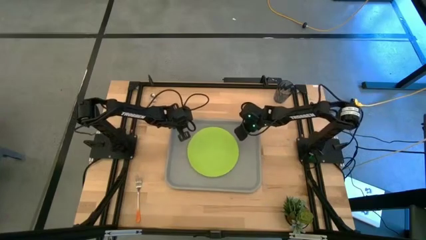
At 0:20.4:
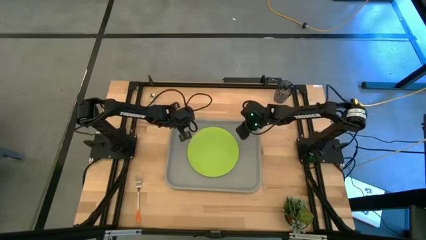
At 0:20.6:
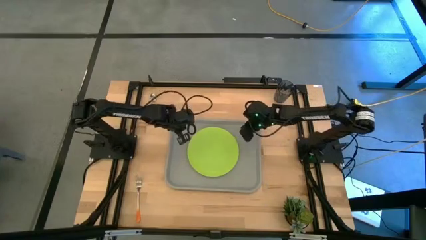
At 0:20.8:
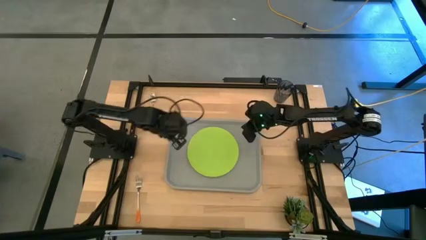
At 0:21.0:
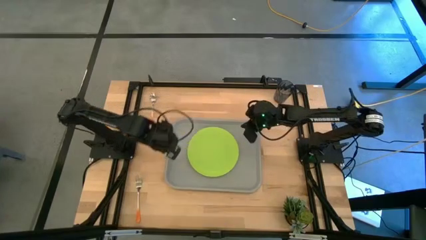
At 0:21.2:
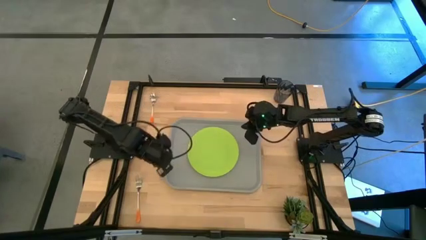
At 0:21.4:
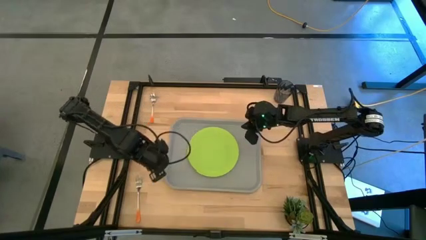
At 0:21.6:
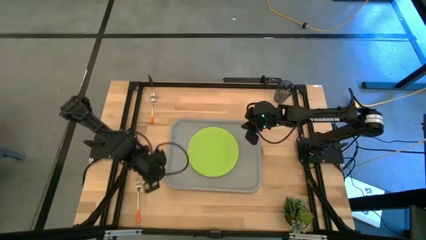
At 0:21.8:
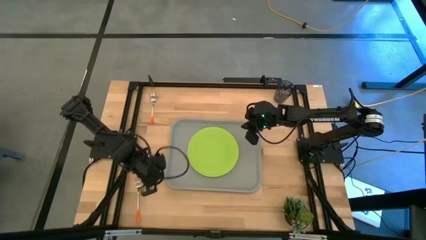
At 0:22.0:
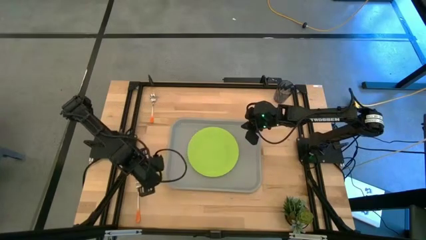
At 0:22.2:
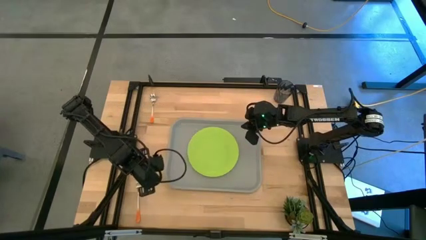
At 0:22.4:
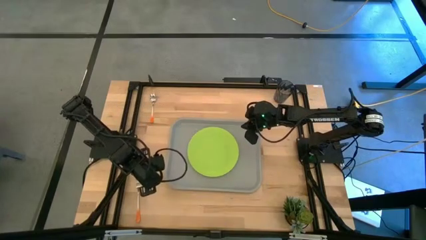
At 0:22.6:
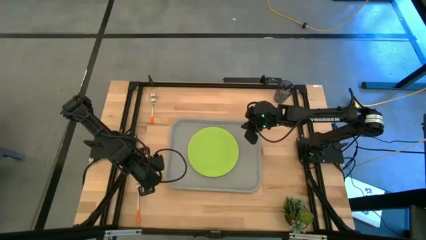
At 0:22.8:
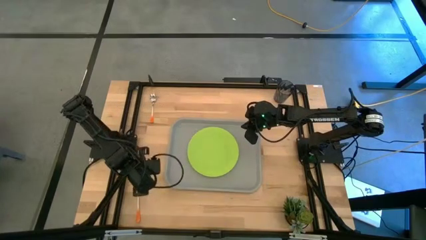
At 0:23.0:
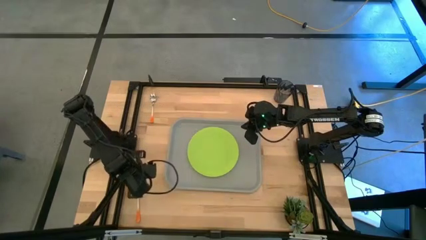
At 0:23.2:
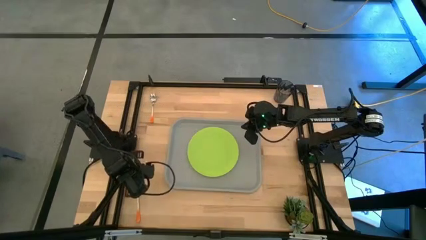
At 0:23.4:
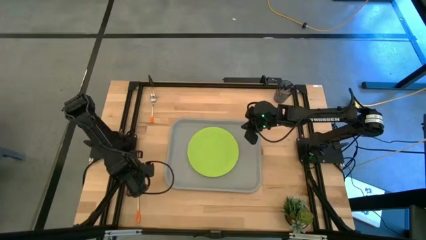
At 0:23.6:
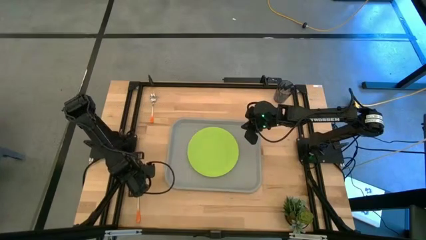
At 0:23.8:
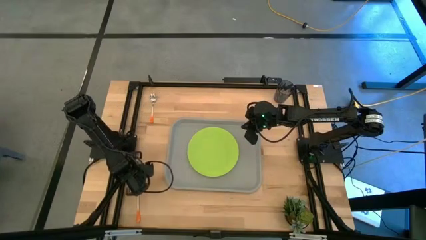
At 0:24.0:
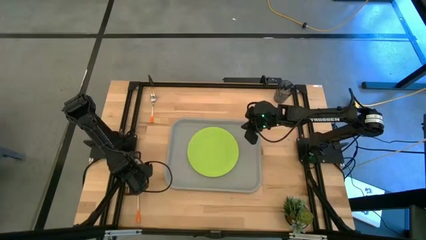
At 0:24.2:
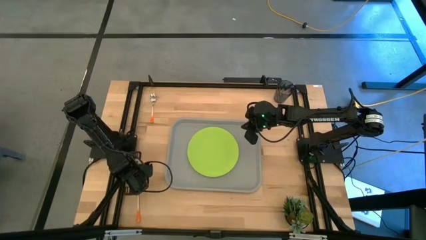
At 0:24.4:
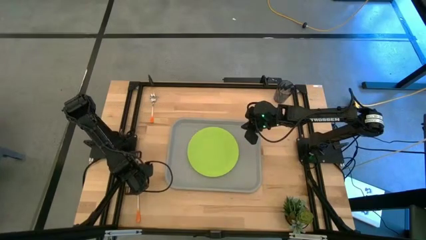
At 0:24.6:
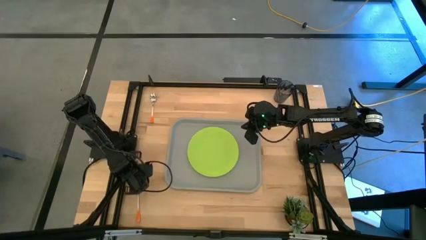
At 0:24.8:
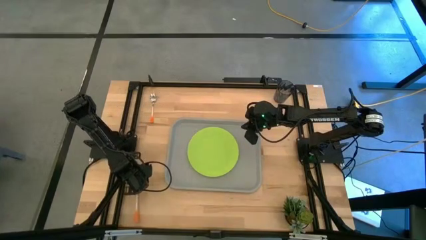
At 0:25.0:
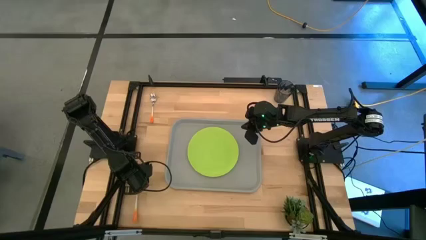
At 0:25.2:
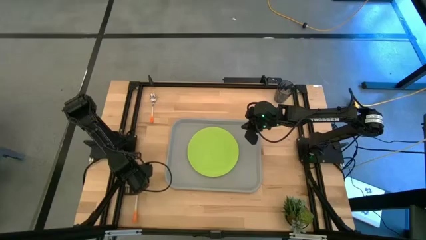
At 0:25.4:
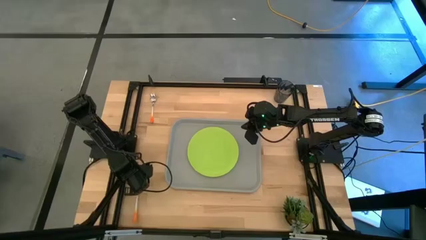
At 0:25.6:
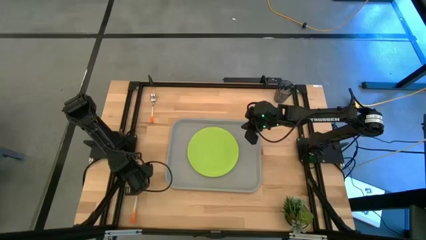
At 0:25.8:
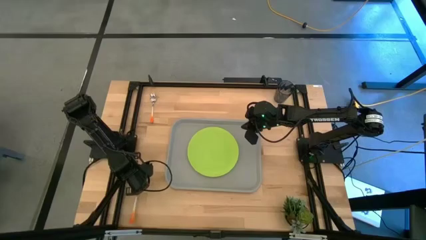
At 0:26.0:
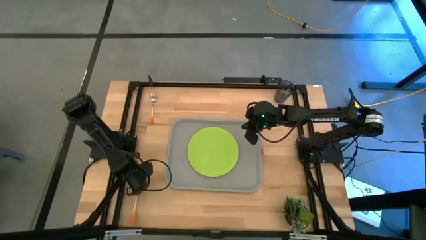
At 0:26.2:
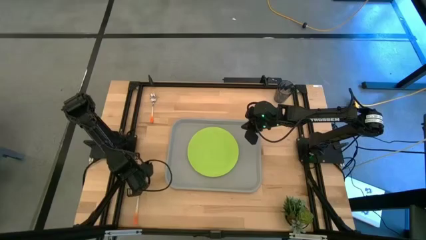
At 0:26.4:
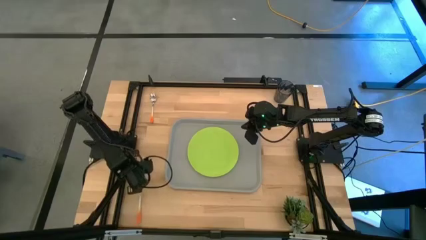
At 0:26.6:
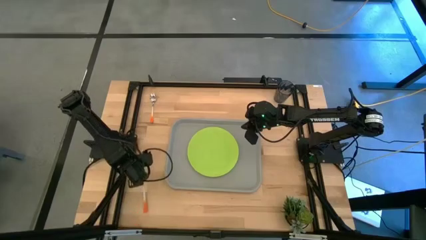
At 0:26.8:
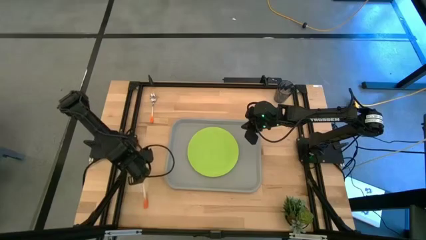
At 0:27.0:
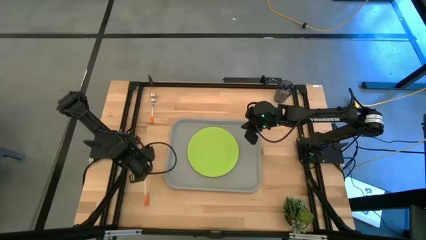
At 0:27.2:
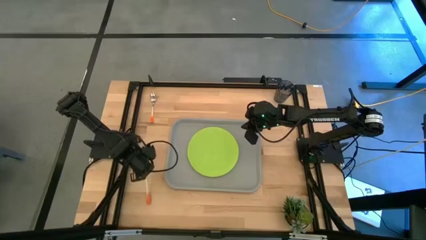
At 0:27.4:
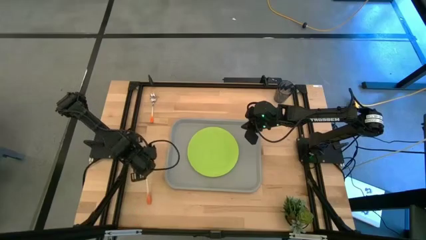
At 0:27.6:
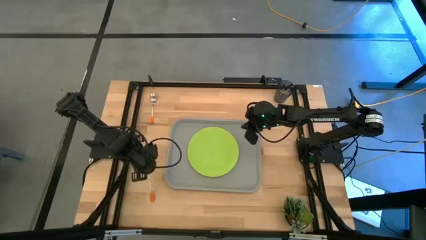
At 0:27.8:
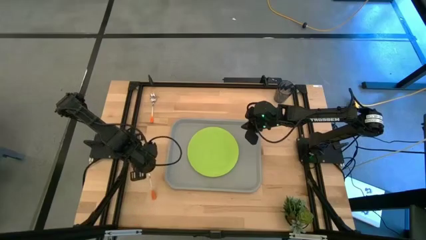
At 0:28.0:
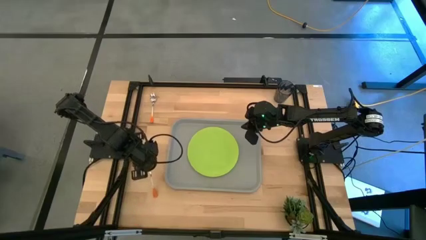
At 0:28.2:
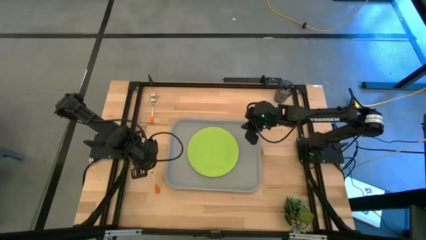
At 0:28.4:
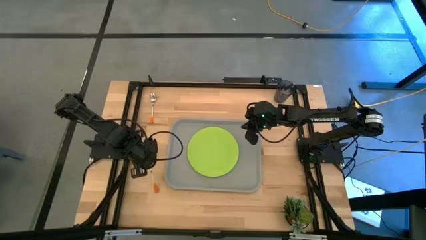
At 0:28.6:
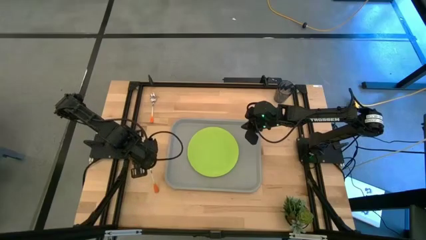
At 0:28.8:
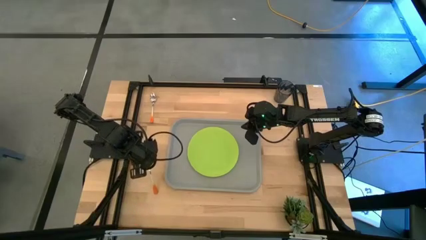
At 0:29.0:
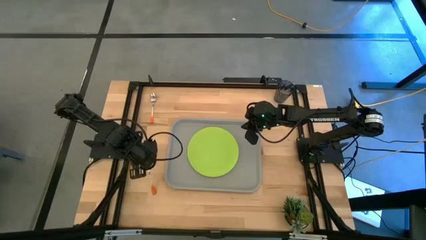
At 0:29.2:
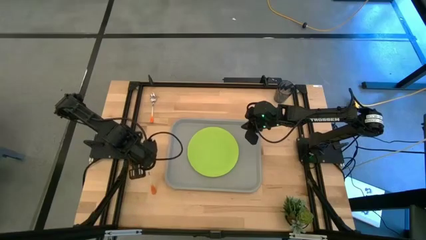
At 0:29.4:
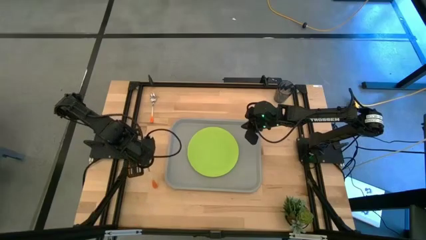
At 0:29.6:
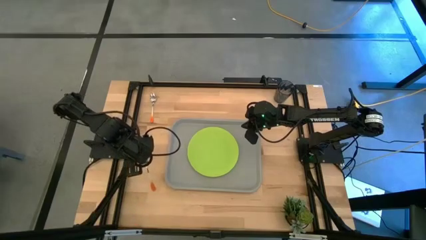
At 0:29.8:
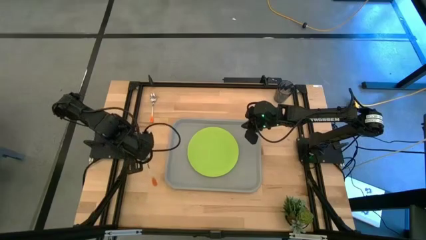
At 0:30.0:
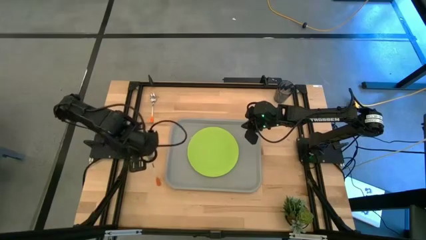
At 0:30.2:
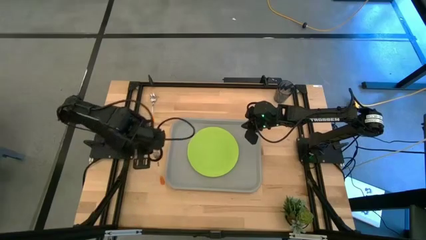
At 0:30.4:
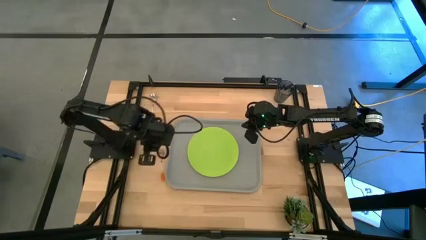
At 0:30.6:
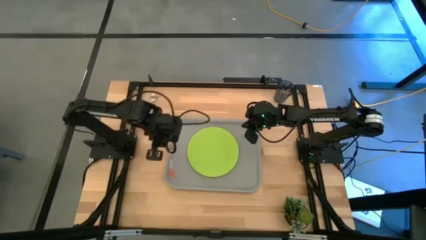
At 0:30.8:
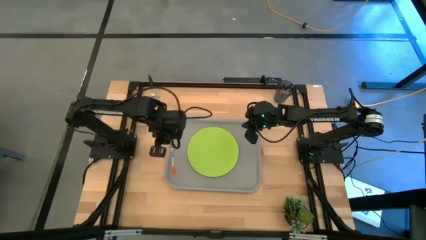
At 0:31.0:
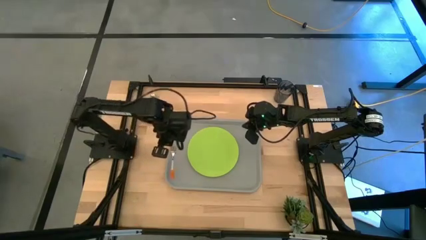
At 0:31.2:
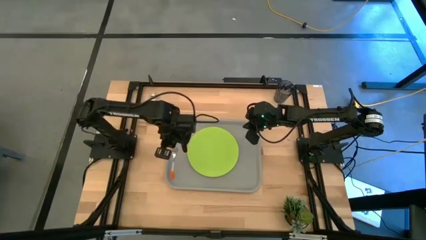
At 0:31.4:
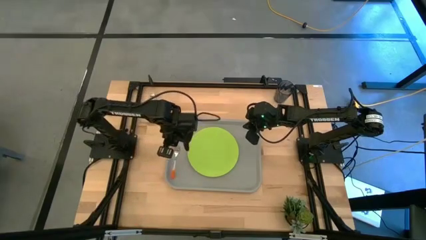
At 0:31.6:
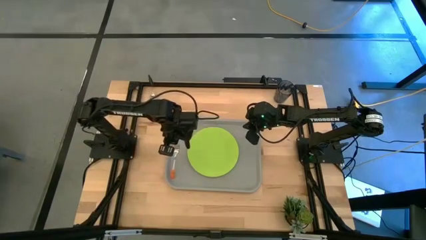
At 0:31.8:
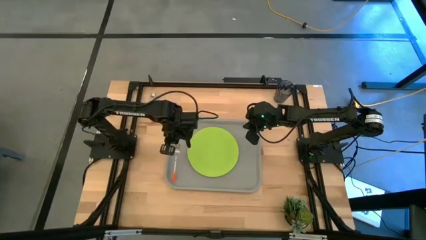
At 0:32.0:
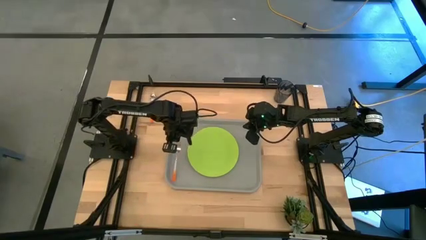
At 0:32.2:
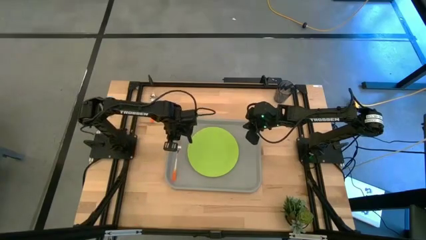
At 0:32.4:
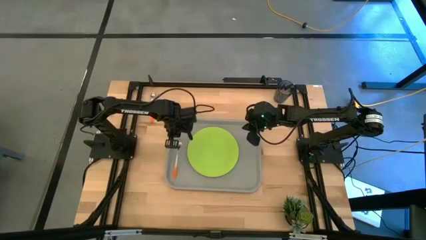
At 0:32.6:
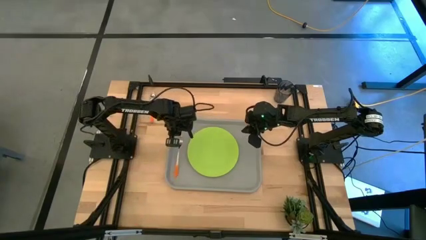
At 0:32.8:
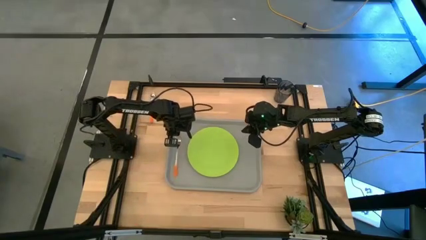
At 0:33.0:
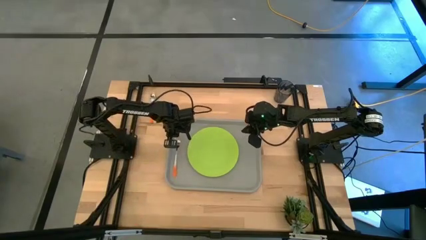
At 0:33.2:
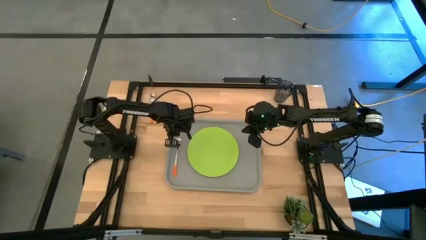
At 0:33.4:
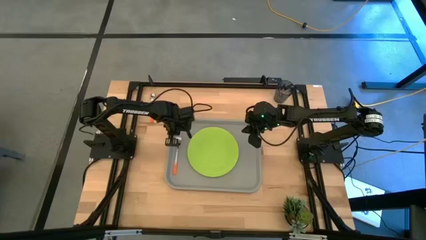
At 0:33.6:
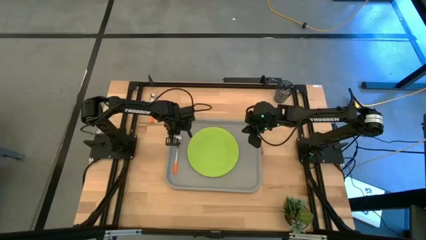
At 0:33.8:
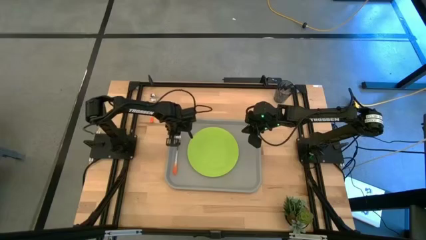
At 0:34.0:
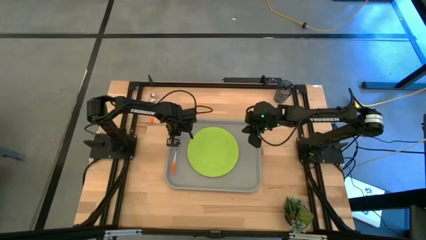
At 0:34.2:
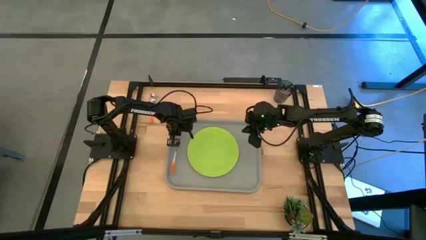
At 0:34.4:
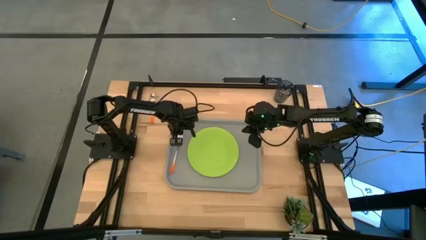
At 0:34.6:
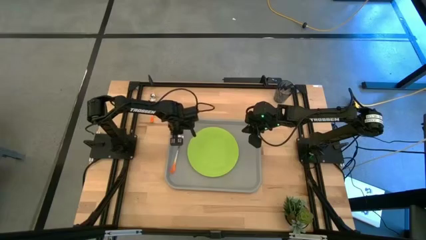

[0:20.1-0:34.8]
Task: Pick and place plate/cup/fork/spoon on tray
Put the orange fork on the gray serving tray to the left side of the green plate
